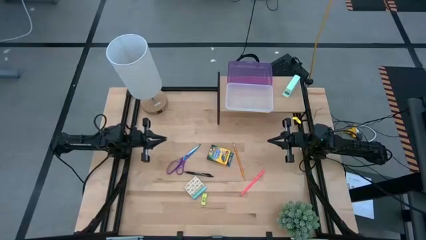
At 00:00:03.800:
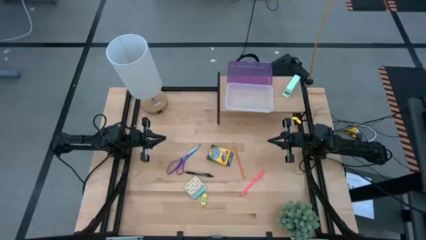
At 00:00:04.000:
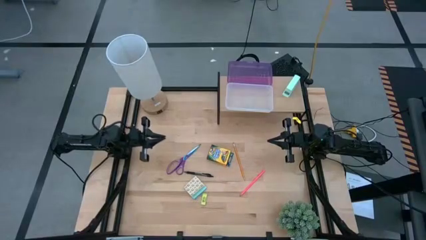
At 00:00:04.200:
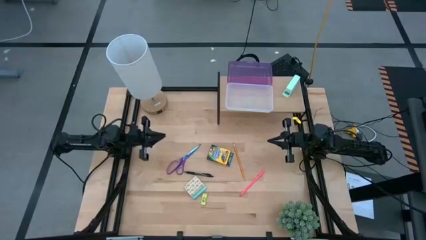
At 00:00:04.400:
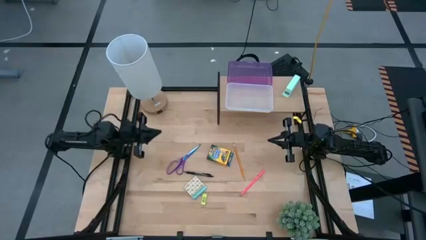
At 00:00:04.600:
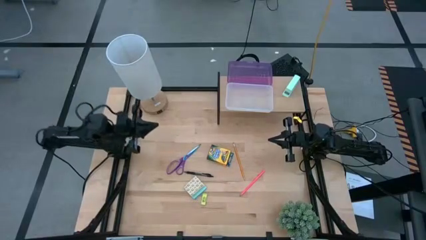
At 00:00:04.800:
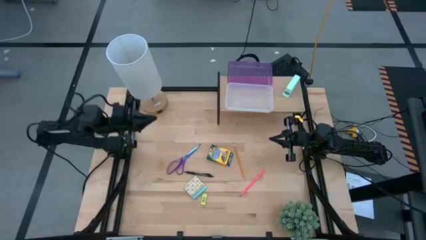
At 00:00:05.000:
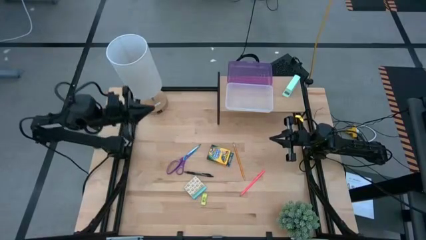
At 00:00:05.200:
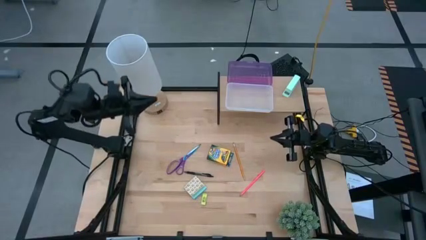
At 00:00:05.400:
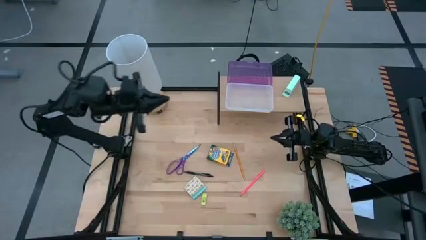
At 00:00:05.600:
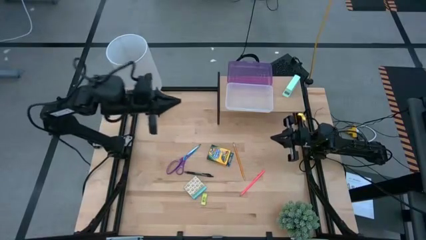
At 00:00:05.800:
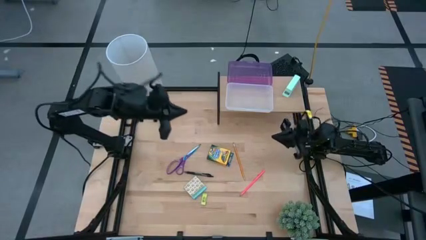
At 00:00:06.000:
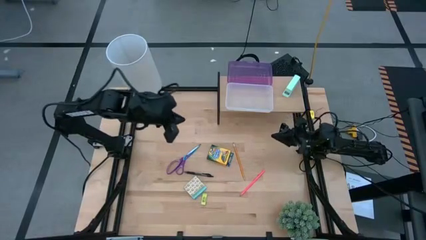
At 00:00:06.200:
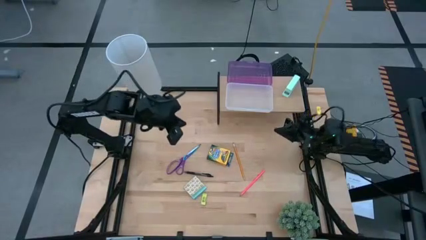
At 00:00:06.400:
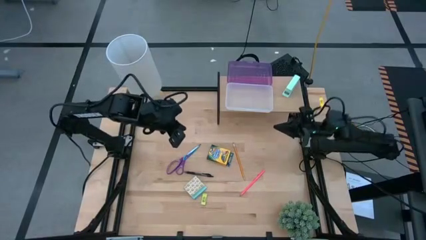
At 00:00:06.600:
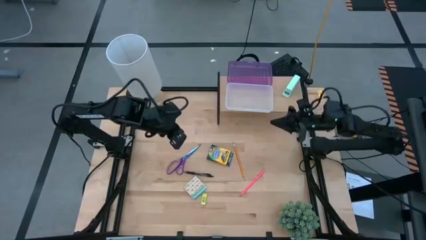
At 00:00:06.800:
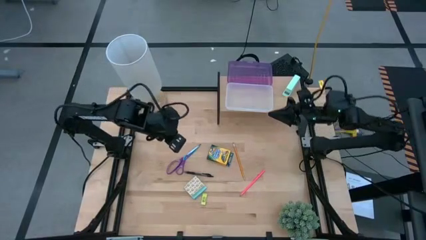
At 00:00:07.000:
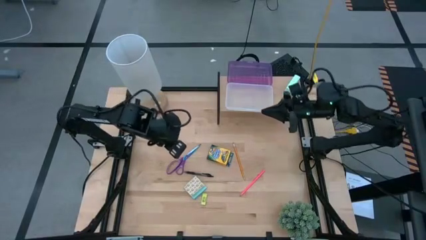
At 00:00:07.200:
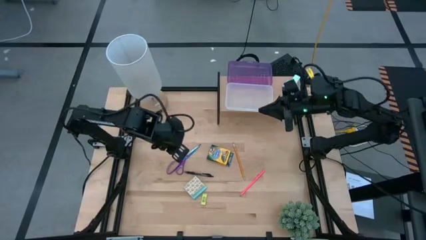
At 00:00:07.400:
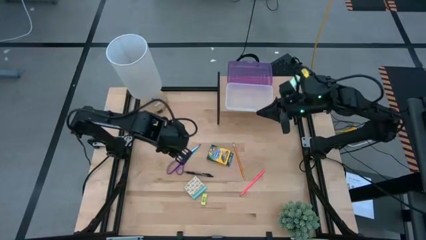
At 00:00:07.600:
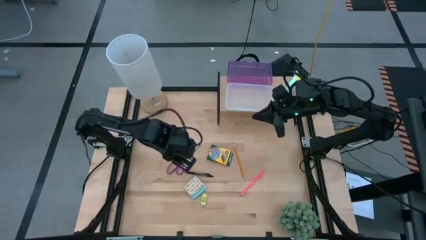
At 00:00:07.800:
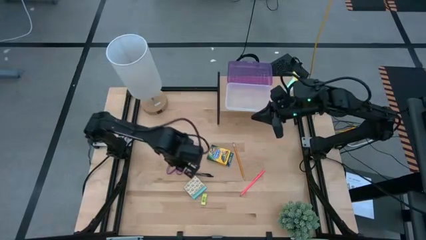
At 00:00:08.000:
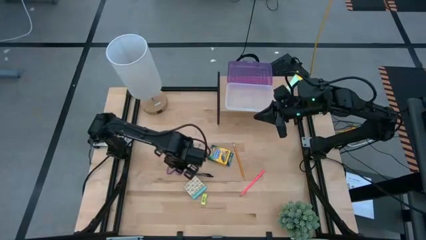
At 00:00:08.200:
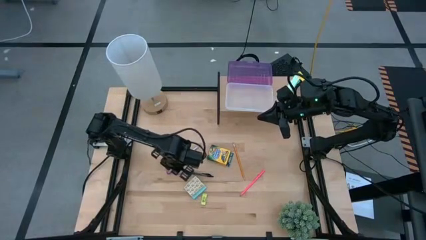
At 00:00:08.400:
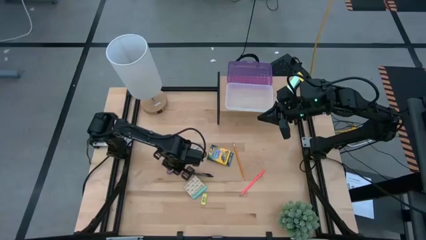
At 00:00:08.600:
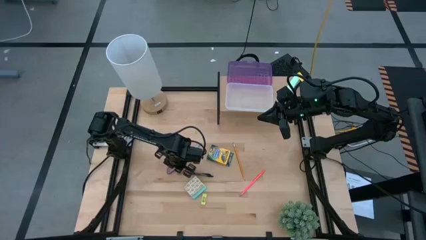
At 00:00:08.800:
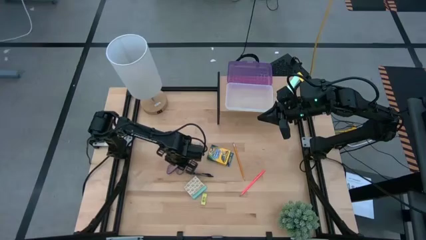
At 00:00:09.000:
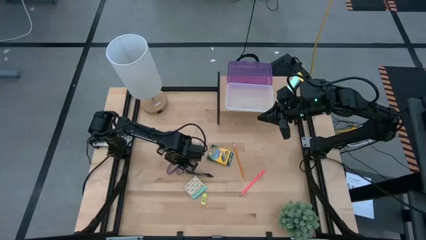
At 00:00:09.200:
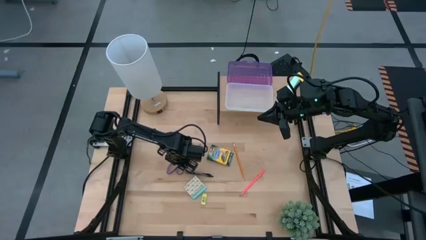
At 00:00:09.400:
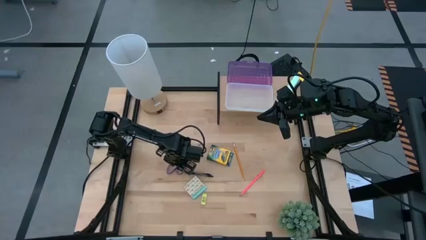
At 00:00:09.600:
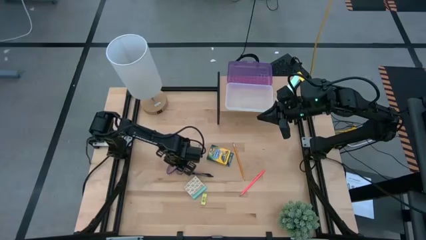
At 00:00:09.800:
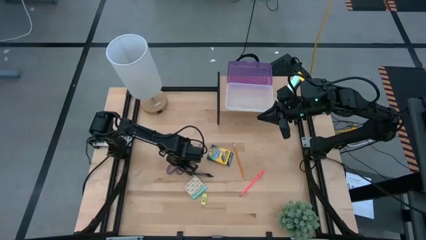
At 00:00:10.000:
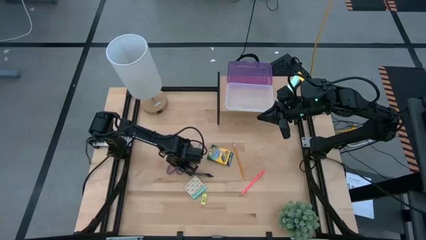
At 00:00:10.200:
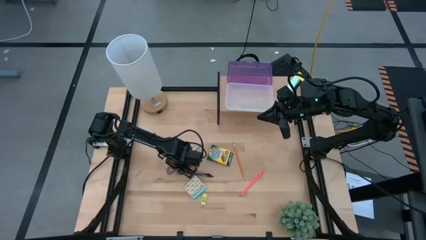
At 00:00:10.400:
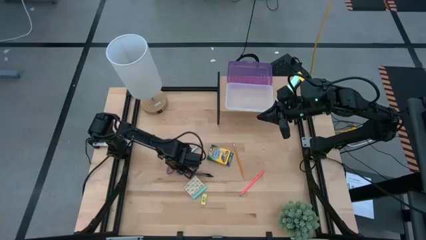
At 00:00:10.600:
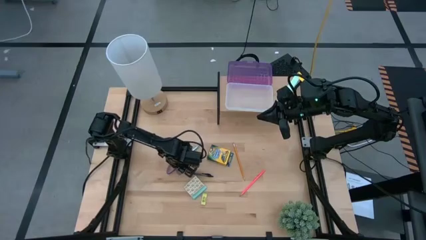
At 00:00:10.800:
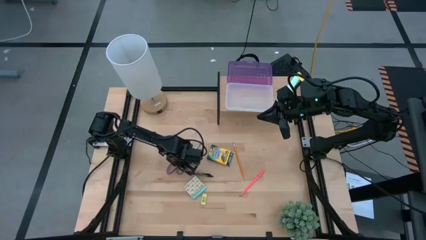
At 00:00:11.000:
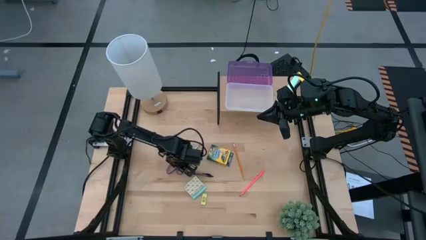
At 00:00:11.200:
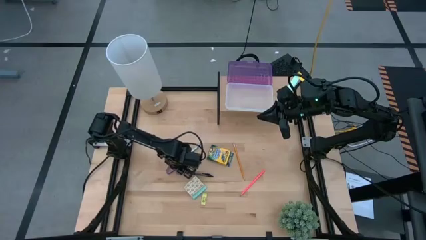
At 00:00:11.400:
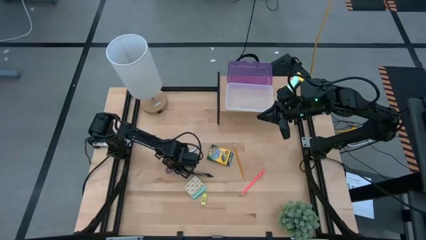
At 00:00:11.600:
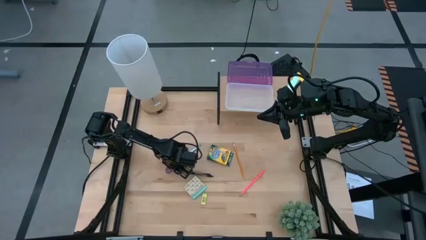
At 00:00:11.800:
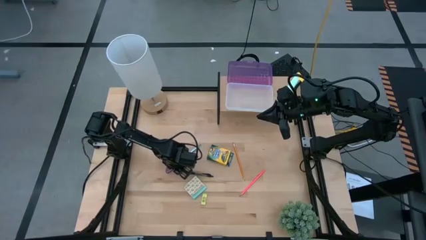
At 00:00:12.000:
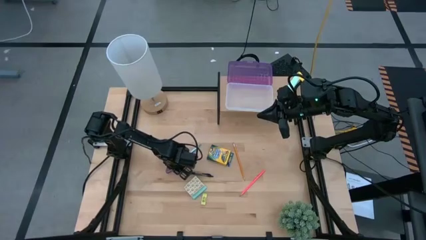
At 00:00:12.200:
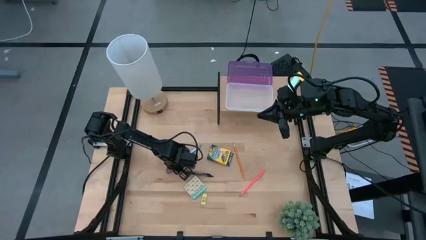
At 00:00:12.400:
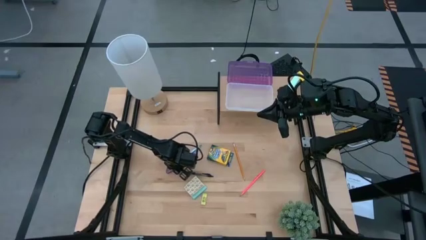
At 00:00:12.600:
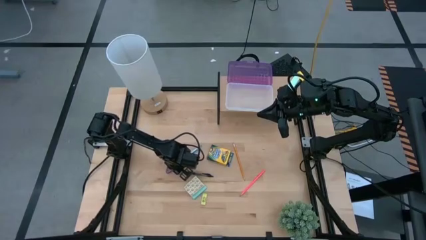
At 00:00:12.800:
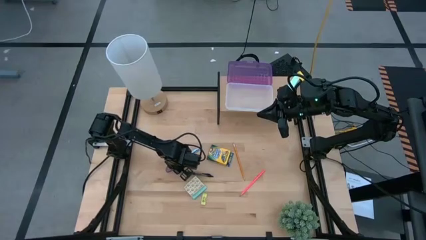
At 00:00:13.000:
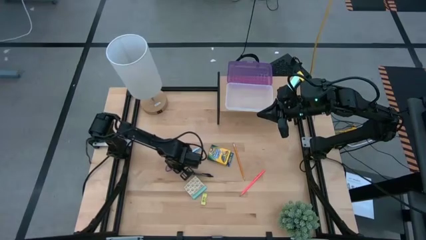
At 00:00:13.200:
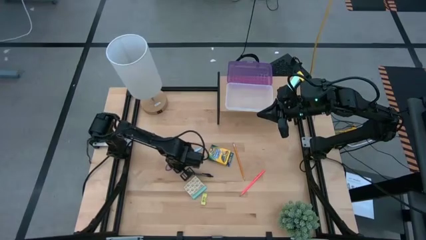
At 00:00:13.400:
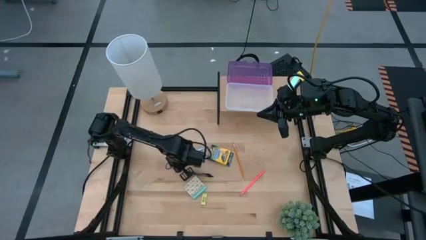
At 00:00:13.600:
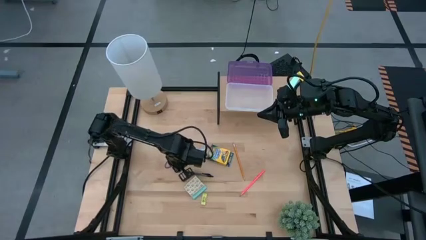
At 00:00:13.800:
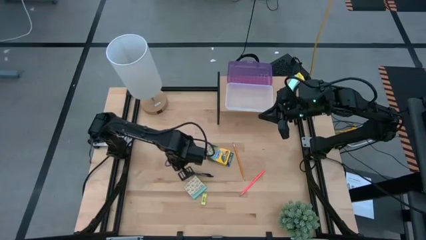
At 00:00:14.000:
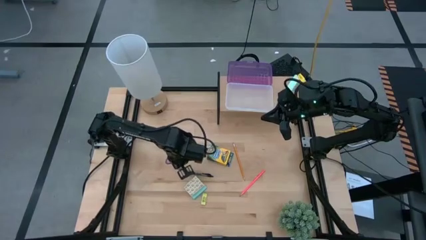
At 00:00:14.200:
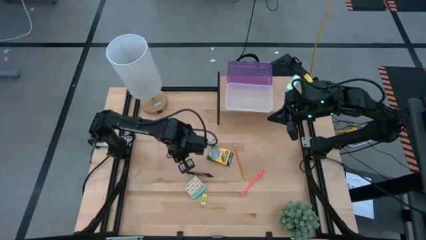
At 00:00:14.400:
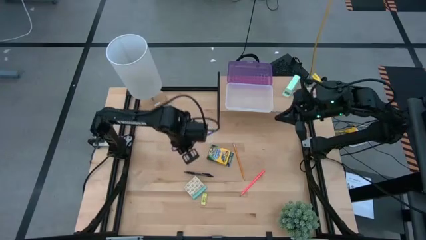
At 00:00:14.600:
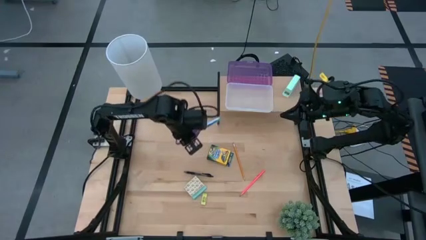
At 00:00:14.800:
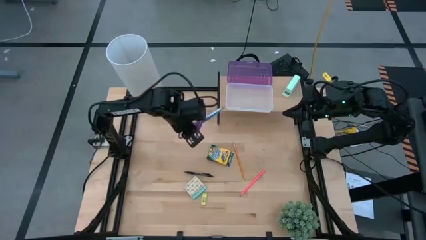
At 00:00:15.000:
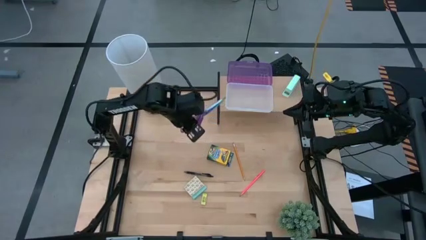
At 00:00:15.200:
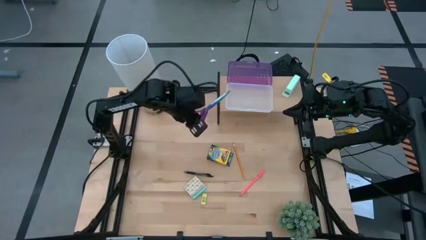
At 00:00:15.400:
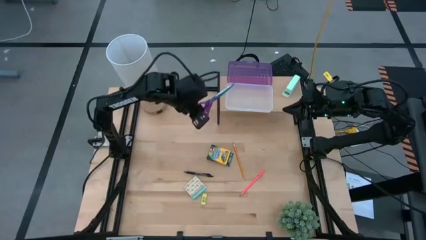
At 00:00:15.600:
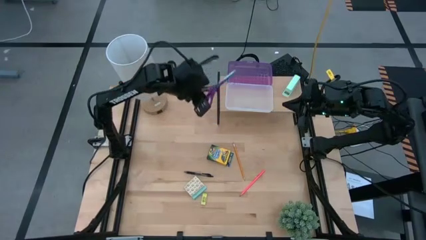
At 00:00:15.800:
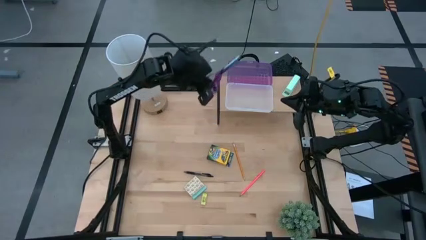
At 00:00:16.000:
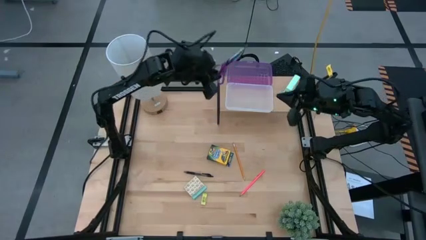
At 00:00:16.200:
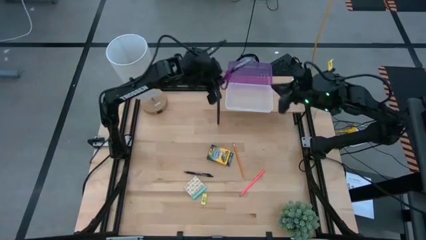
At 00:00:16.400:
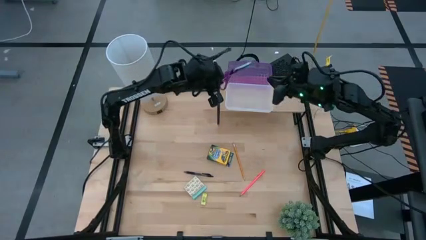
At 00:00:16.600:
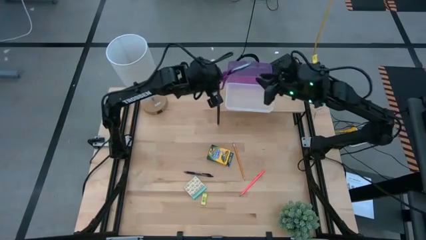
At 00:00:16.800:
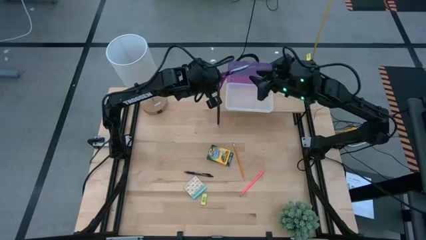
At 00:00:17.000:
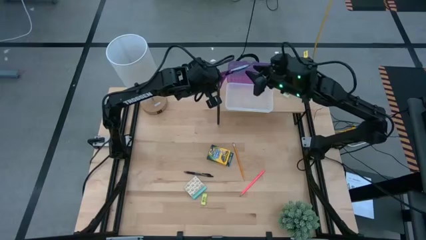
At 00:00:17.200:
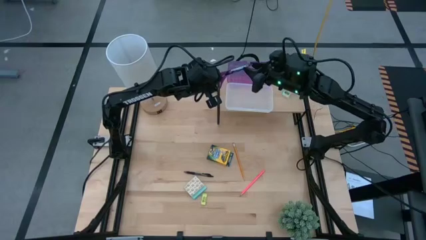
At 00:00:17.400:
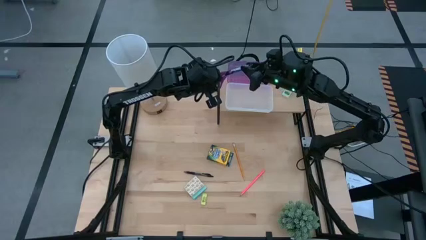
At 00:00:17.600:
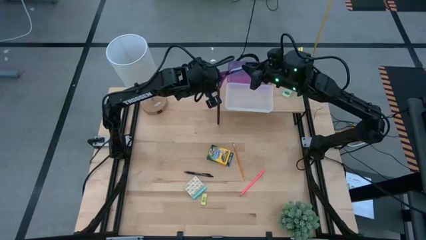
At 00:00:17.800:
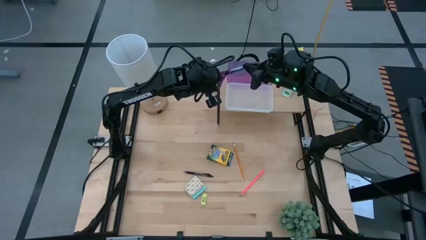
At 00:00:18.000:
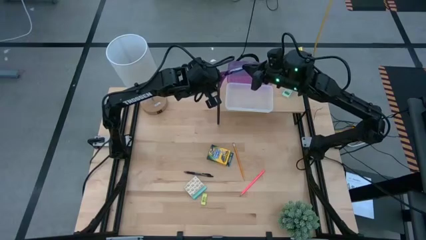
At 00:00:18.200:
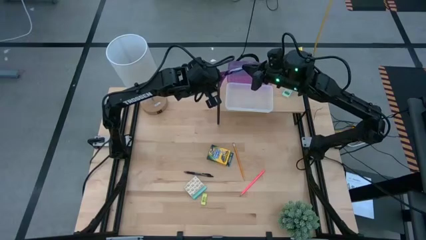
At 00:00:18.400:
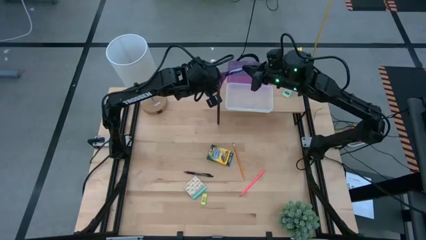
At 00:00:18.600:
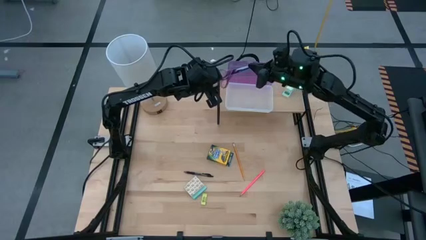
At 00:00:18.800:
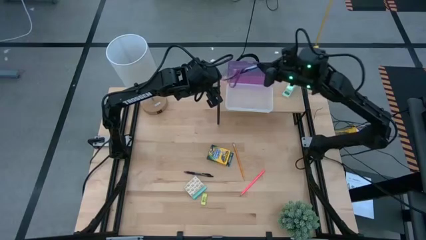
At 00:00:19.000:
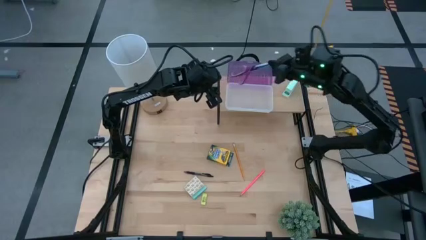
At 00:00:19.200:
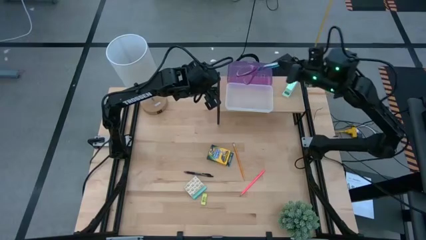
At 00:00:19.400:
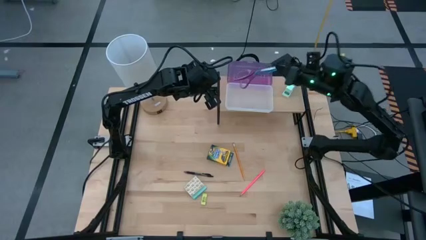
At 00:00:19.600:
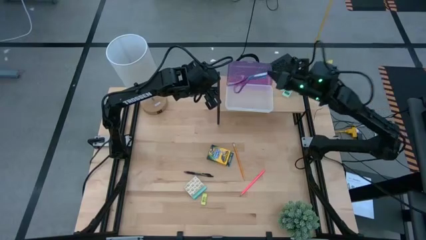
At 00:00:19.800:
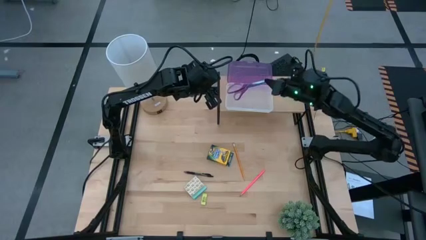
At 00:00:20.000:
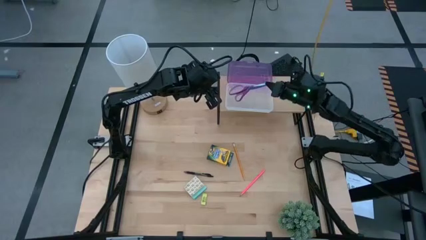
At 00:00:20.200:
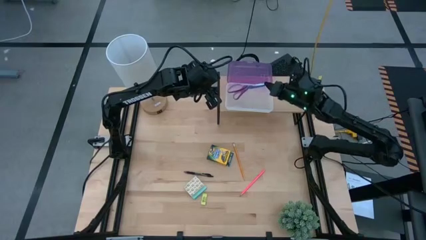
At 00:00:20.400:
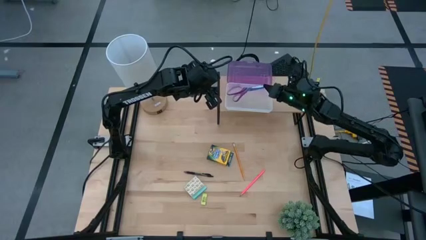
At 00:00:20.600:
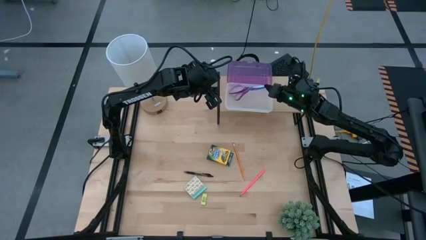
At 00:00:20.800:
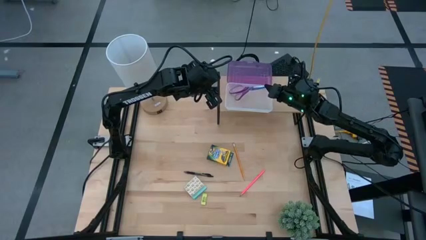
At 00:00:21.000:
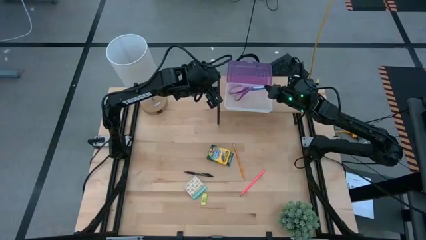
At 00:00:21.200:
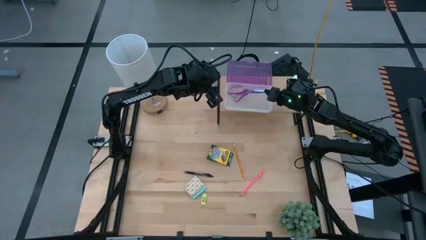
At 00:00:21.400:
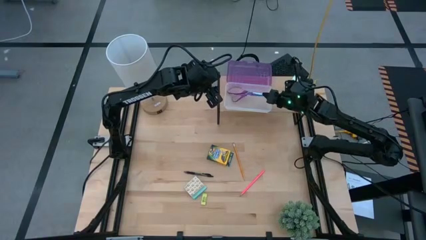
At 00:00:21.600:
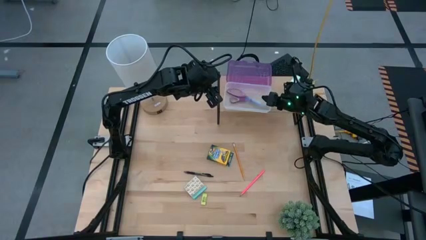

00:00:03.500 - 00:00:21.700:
Task: Pick & place school supplies into a supply box
Put the purple scissors into the purple supply box on the shelf
